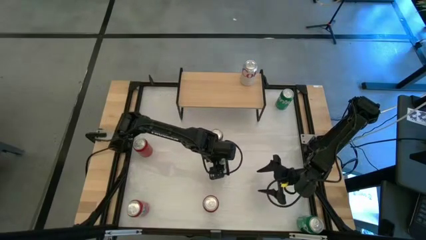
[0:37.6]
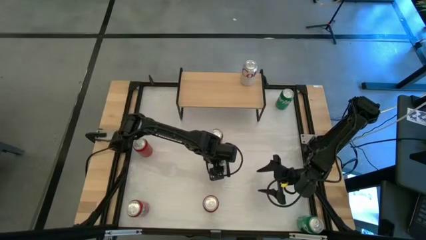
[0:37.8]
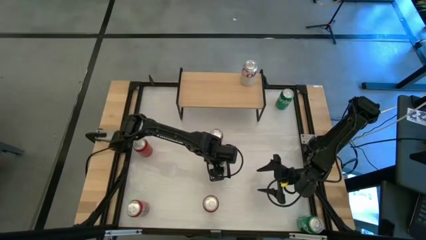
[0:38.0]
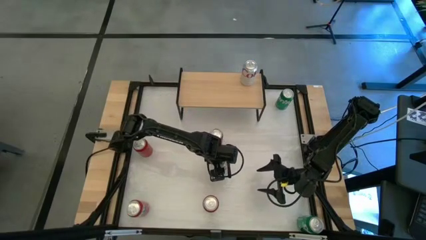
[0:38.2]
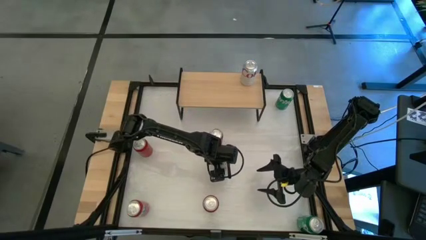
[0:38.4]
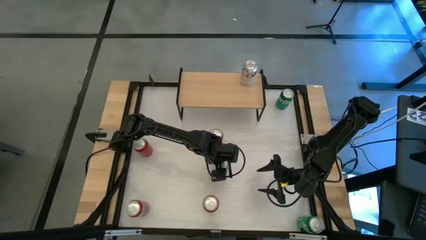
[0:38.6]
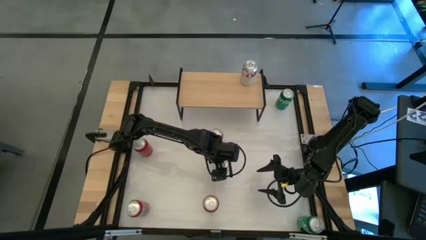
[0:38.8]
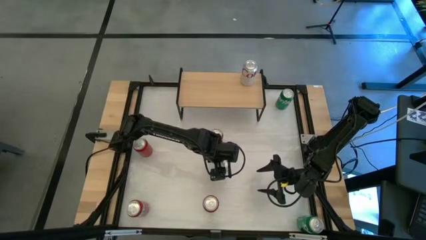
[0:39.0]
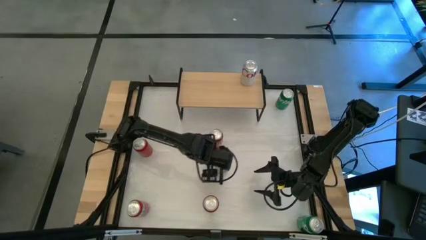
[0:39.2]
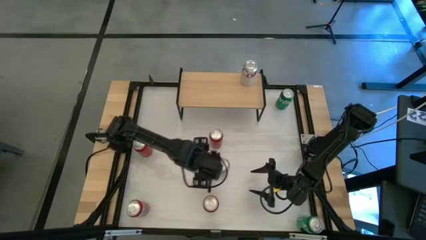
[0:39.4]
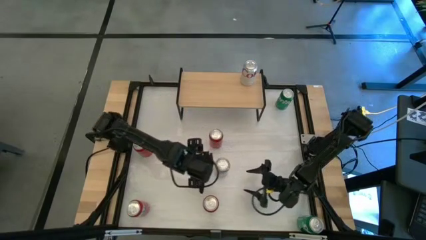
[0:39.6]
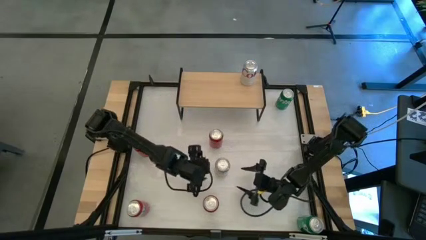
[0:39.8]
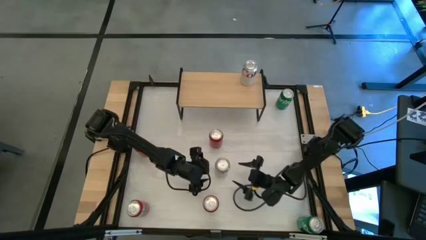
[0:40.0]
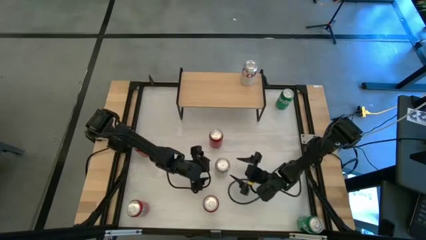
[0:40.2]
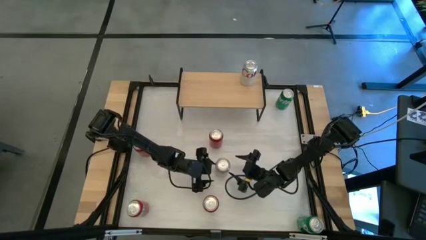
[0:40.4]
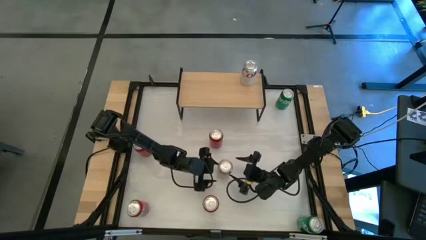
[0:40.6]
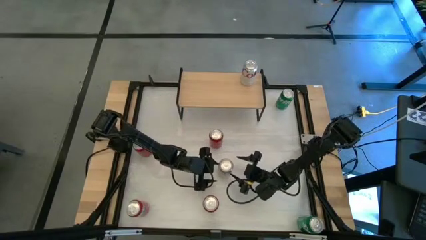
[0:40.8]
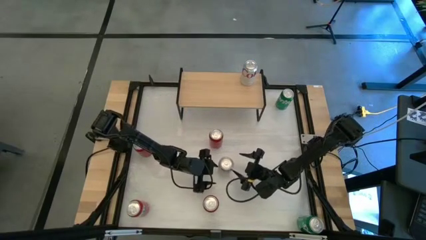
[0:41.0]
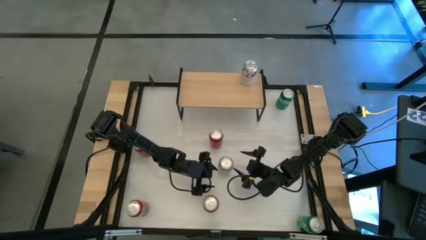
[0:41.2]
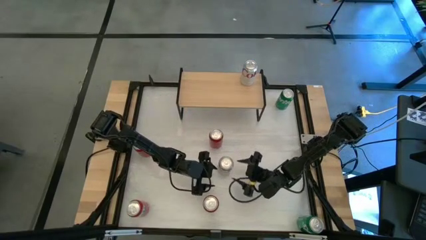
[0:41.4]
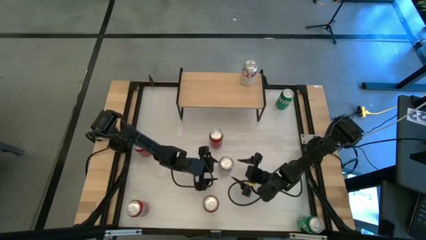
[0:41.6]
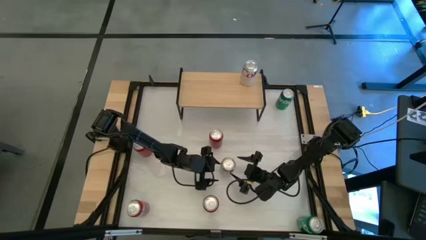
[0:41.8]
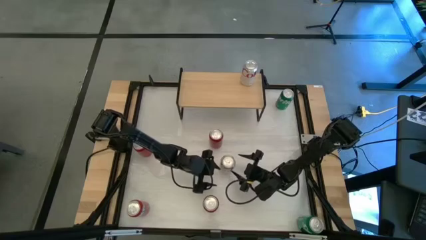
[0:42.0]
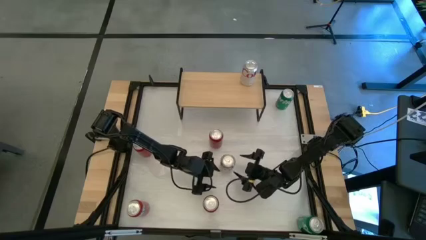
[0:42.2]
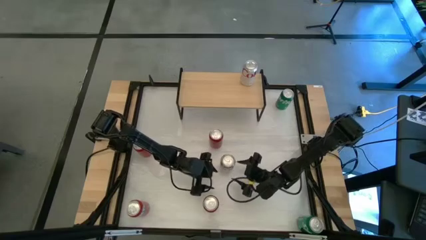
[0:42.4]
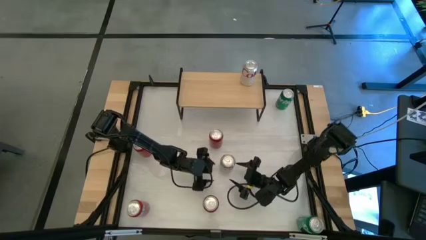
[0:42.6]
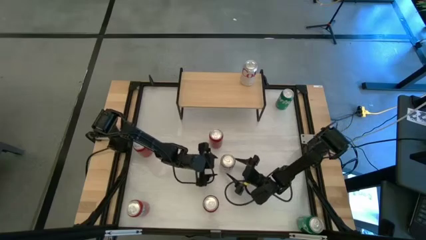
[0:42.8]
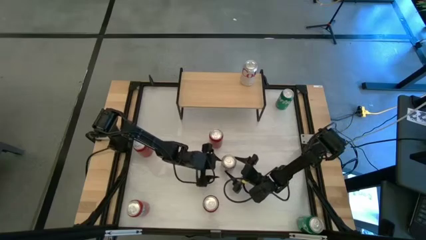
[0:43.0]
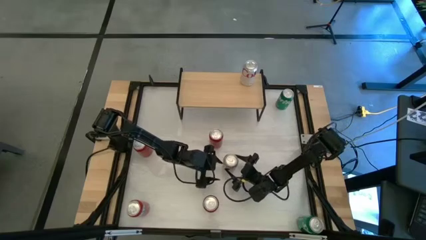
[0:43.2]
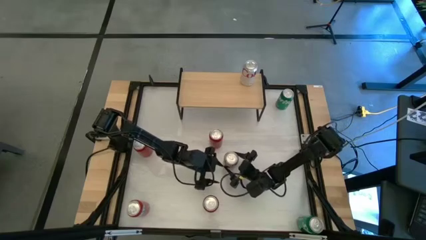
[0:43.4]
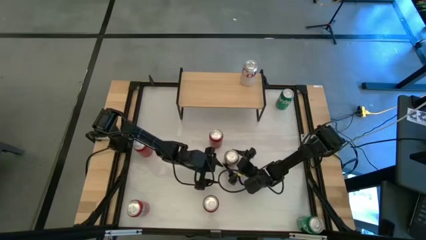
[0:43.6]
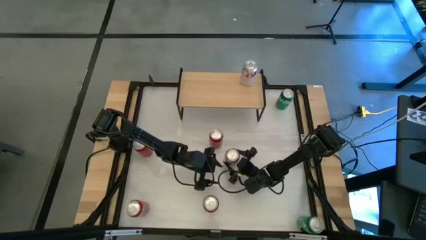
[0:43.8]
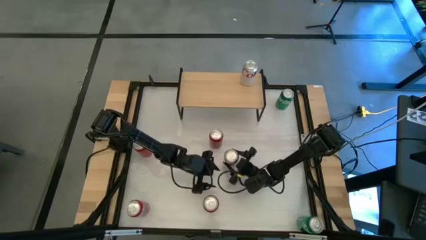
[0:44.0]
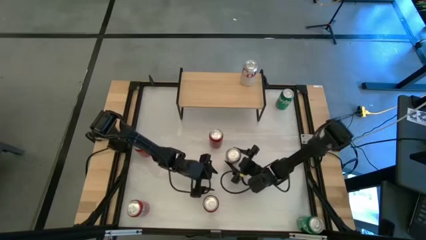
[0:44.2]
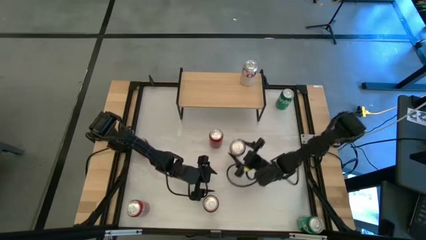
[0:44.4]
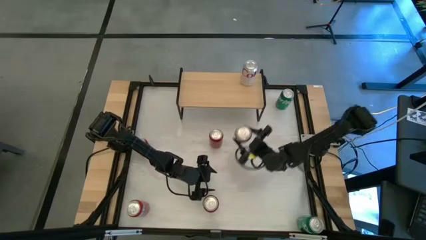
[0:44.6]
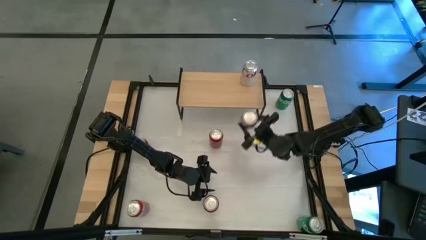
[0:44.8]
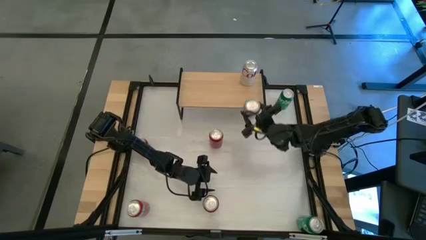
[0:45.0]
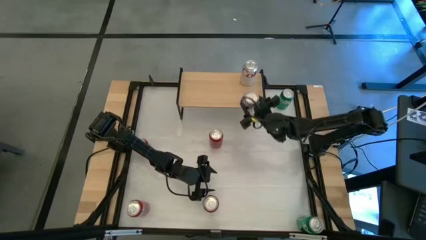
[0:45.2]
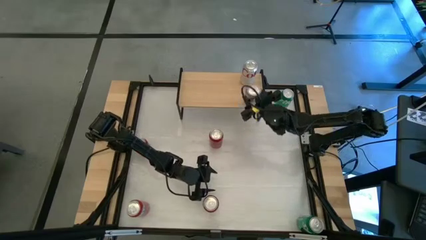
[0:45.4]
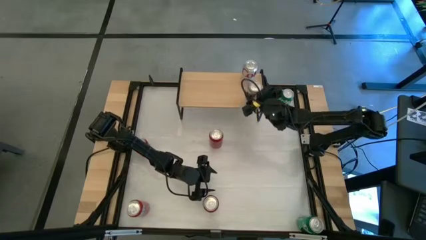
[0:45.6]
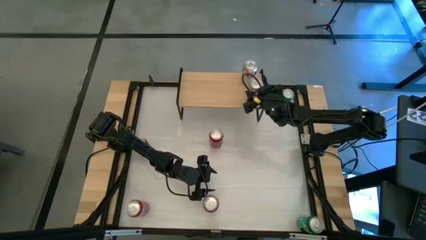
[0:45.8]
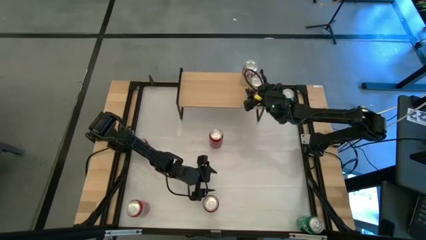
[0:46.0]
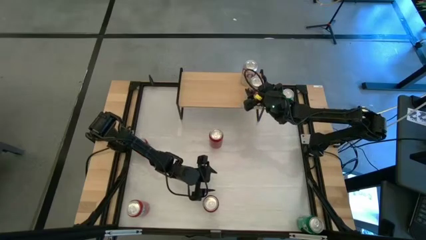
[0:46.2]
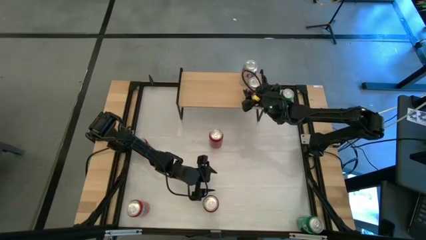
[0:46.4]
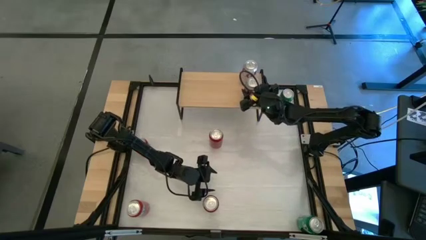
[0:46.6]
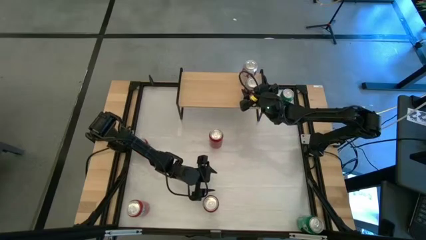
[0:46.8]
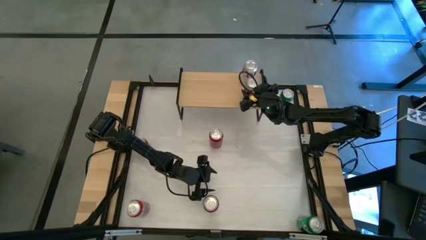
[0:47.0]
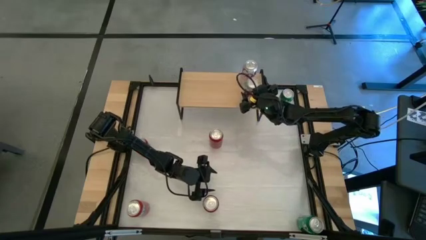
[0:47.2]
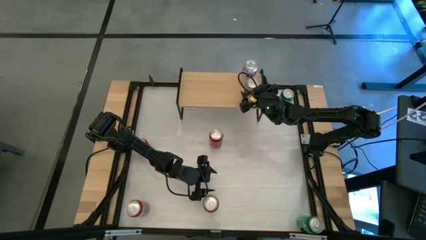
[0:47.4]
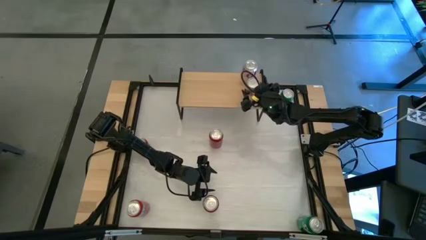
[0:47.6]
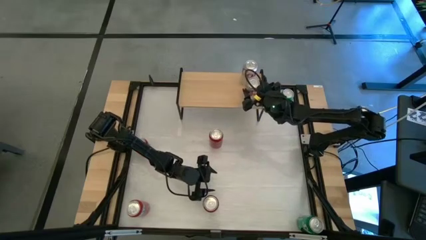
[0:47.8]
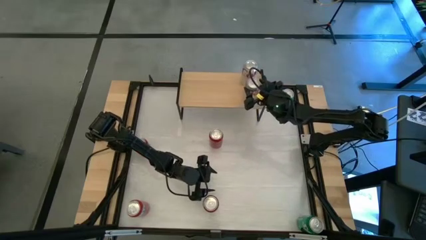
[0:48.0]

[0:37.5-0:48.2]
Task: Place canned beverage on shelf
Put the white soda can on the shelf aligned with the other white soda can

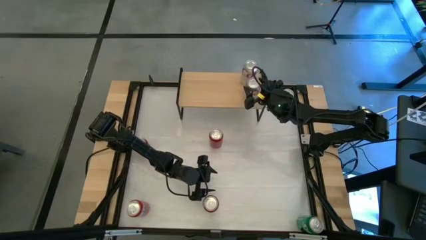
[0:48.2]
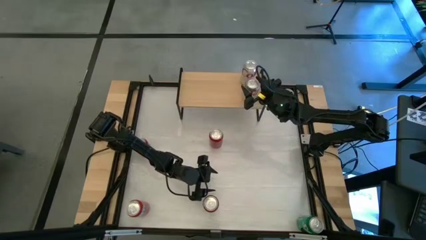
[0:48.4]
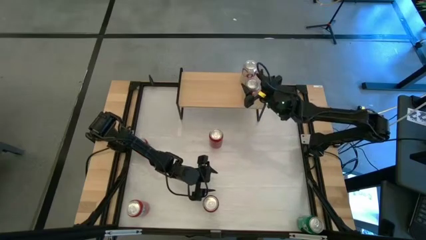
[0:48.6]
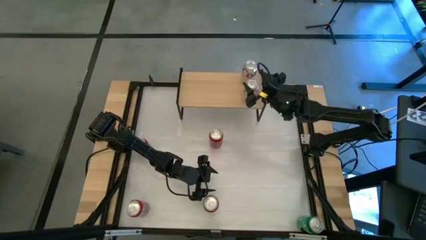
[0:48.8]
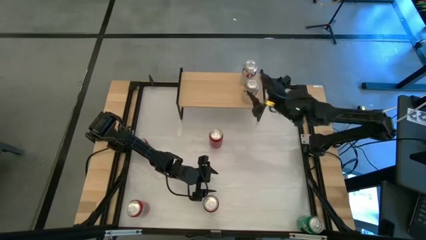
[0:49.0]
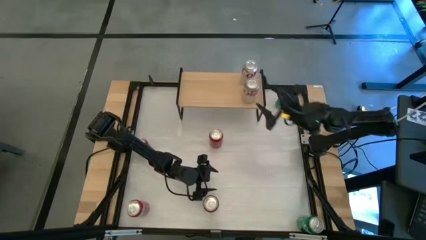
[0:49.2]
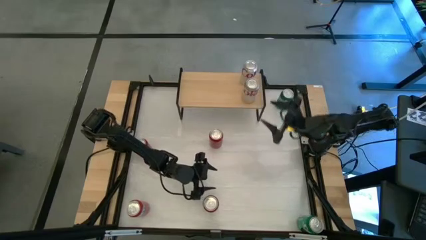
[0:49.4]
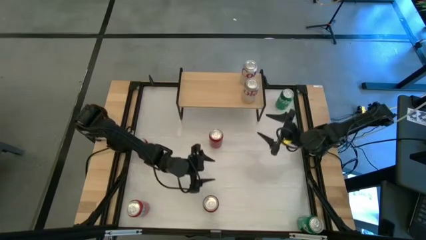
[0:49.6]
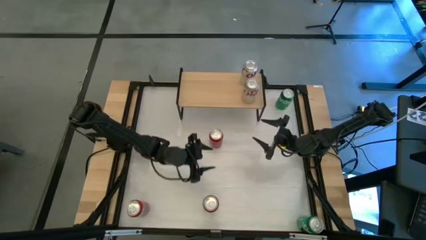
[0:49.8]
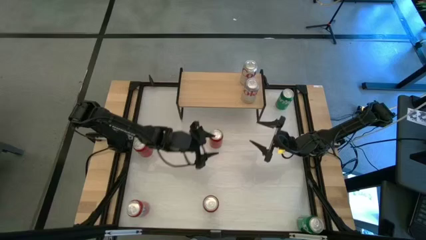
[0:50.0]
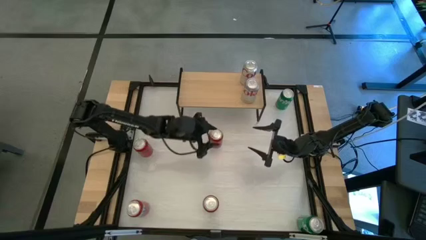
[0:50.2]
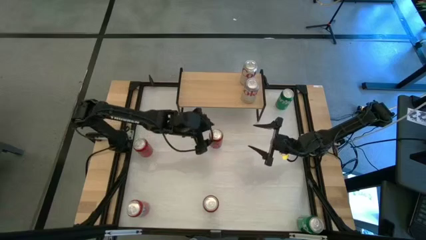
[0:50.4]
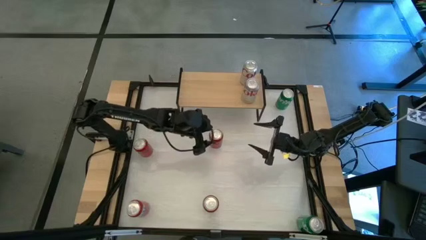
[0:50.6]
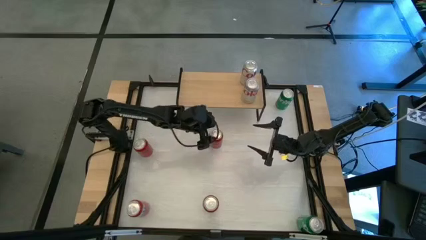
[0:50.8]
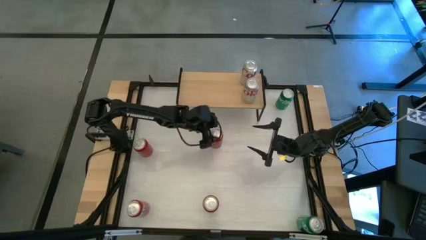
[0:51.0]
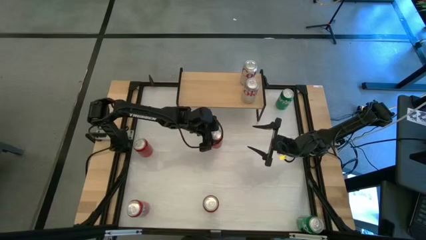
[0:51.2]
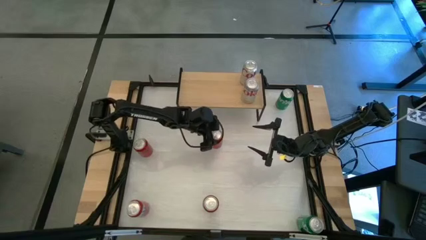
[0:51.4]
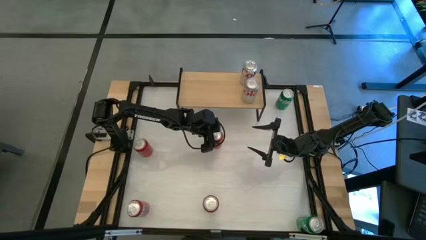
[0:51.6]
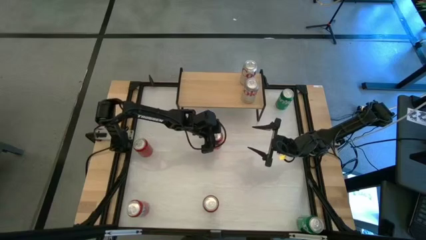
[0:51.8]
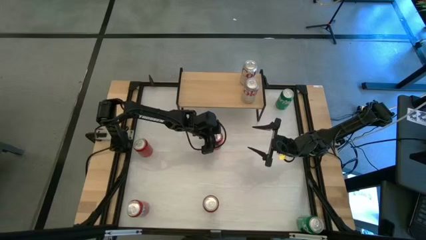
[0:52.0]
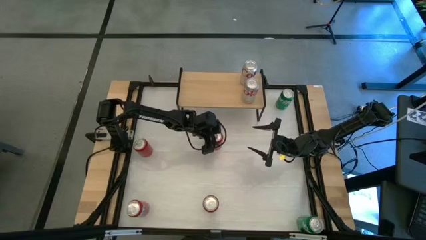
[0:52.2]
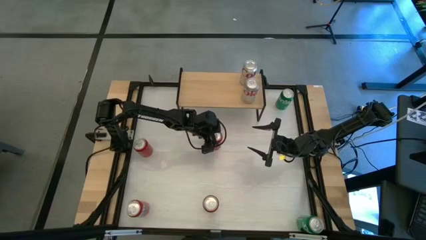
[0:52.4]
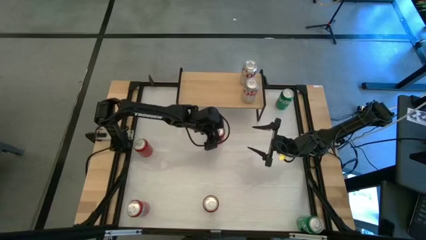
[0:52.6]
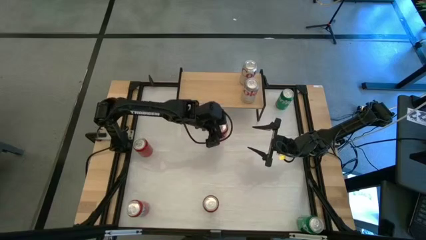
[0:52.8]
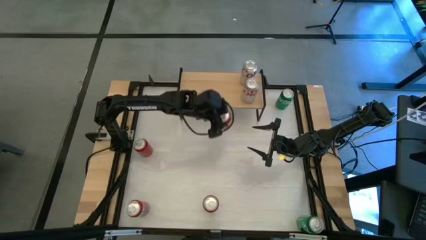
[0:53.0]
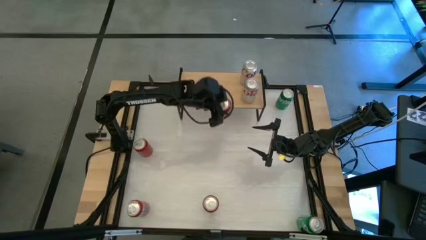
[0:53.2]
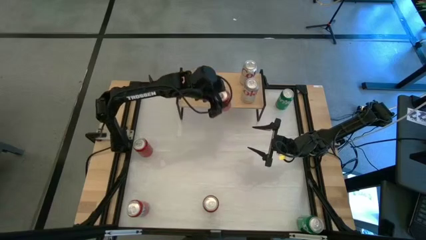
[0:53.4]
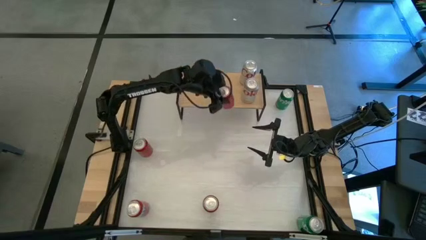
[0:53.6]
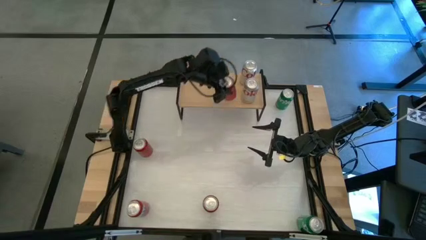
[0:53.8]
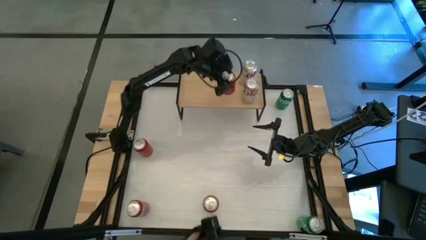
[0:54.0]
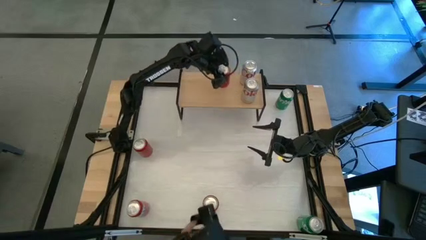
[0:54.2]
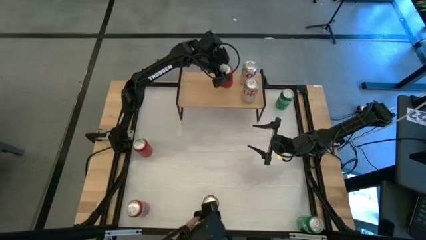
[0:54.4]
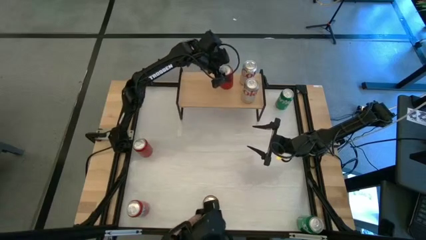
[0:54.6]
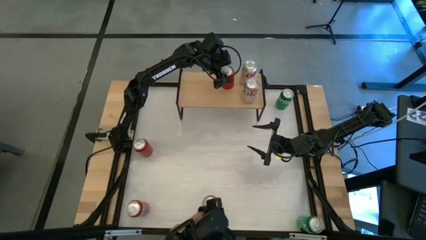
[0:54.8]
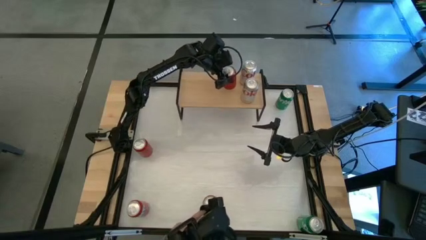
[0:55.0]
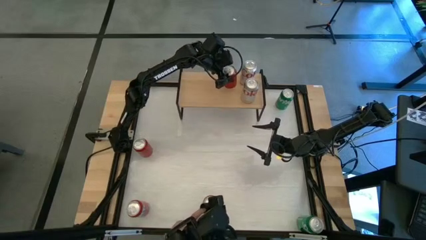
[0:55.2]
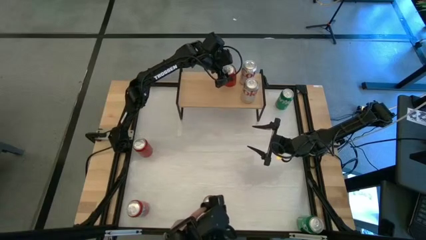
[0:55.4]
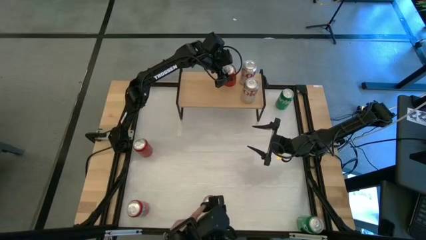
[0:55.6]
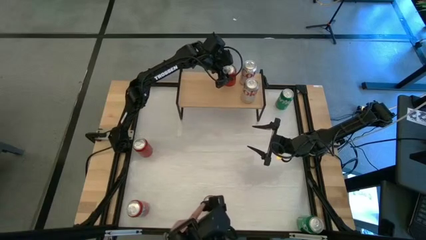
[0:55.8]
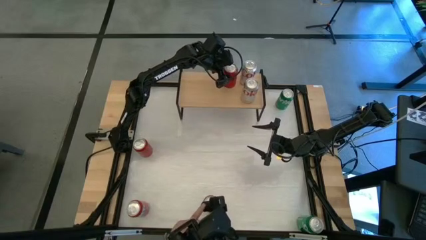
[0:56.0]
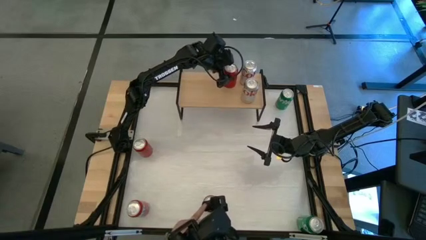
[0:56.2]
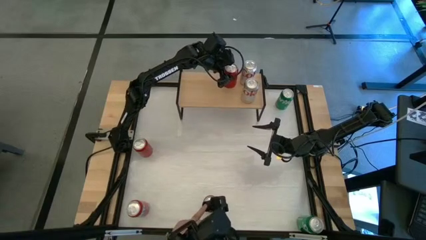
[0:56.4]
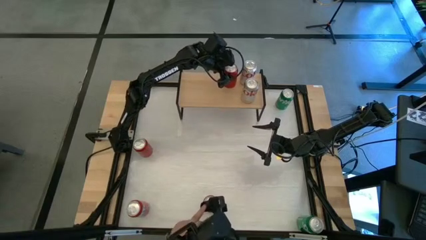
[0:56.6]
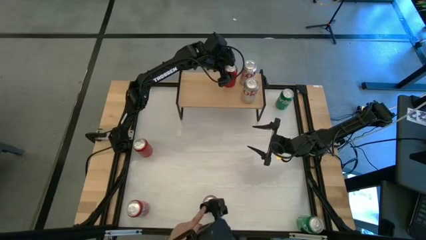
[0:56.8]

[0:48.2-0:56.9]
Put the right red black soda can on the shelf
